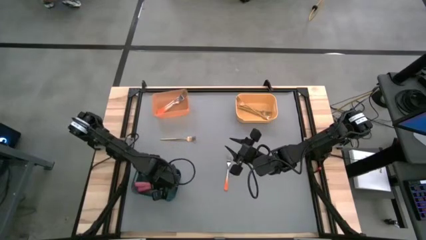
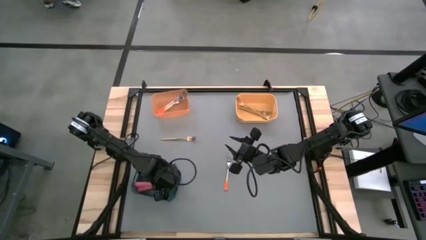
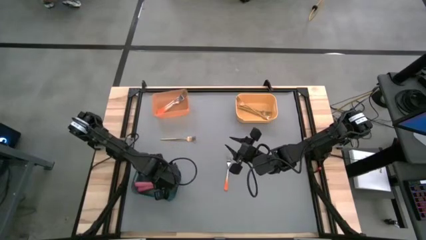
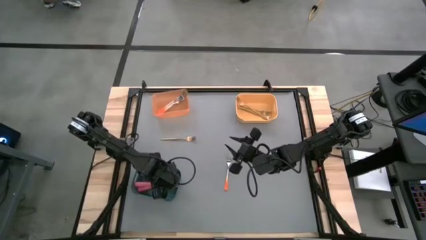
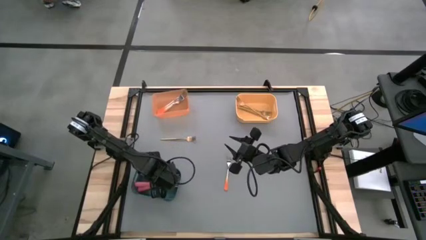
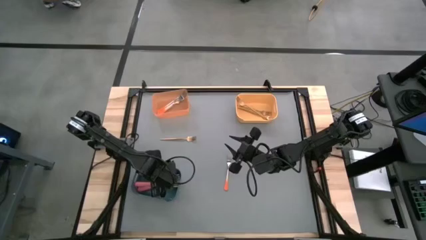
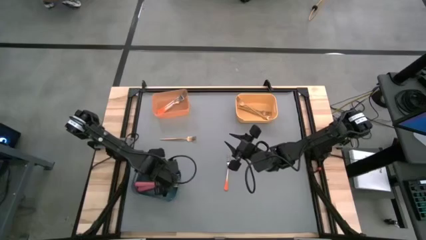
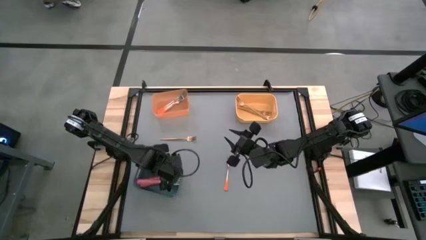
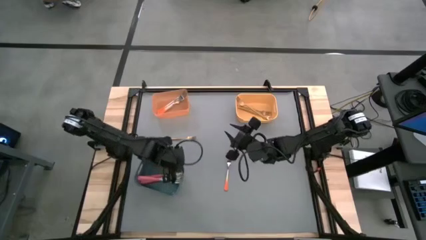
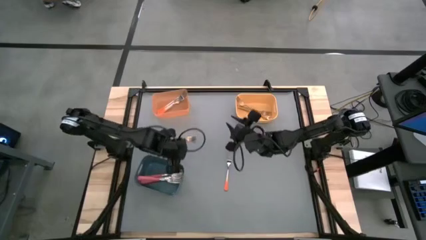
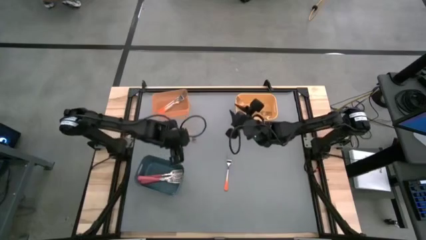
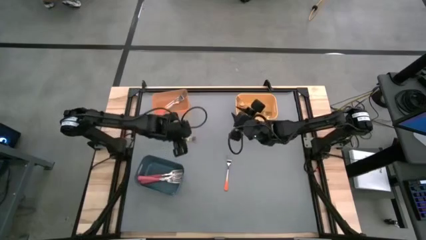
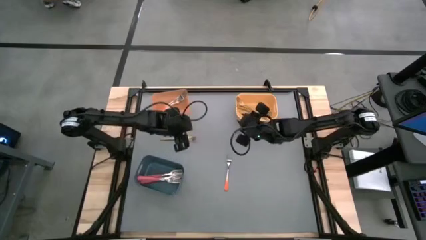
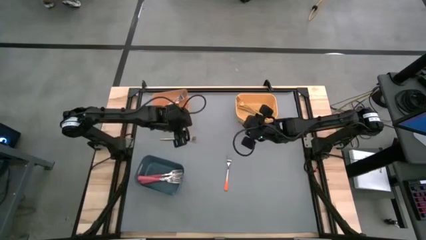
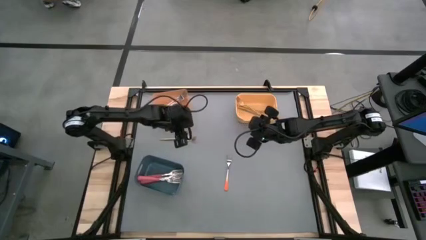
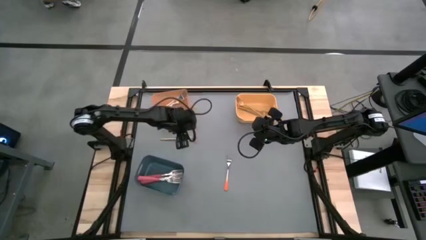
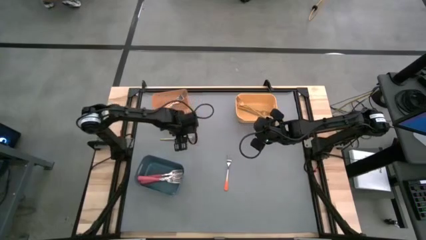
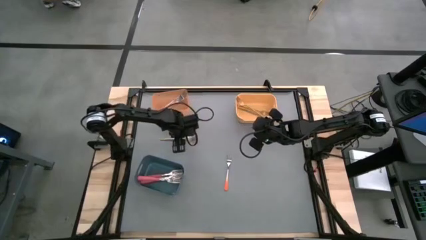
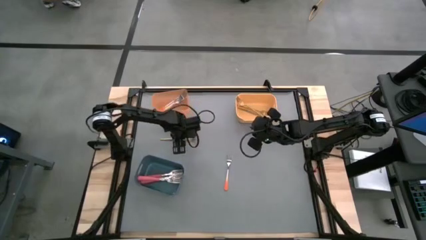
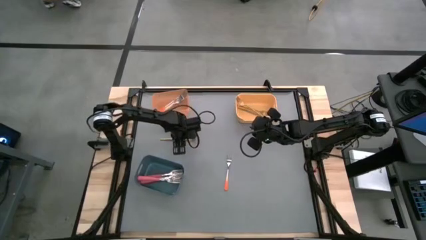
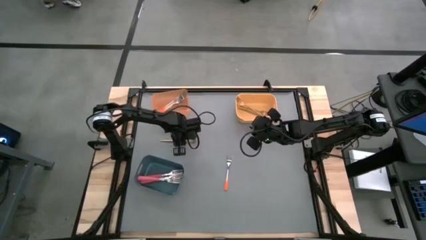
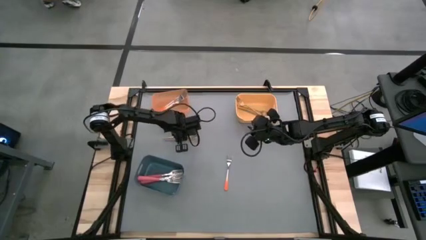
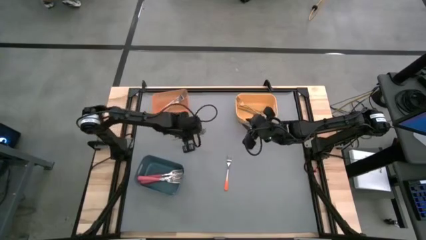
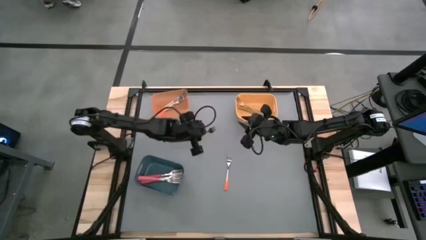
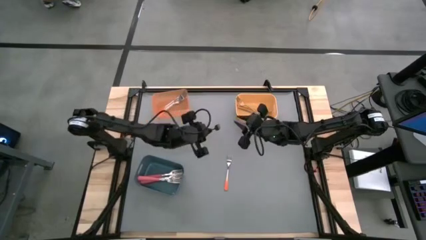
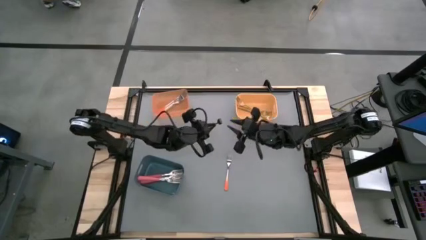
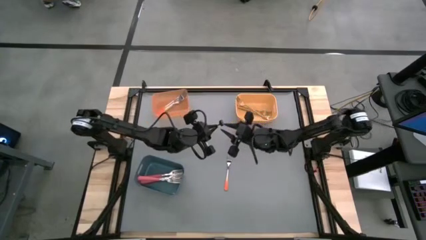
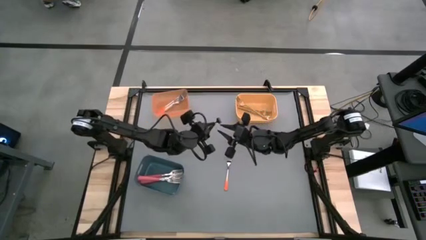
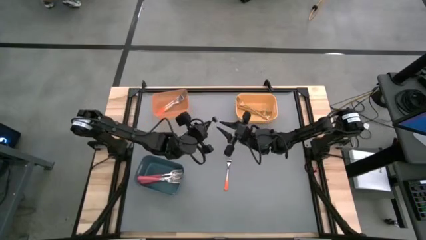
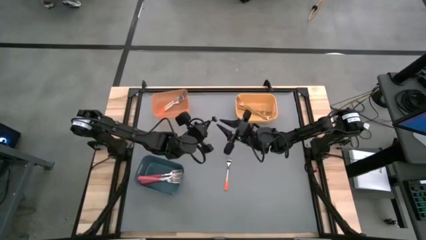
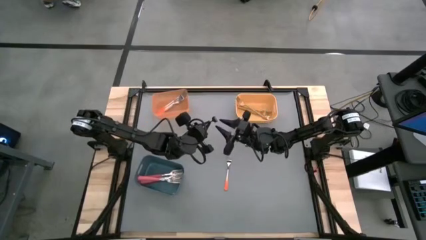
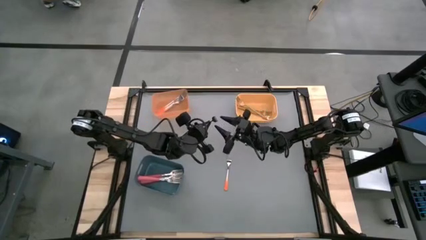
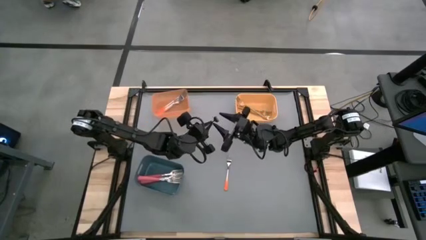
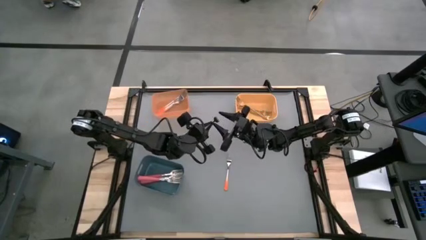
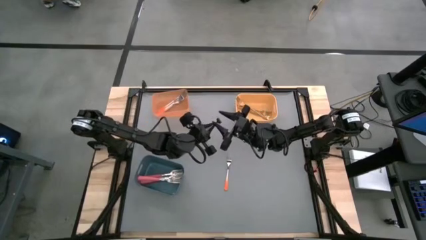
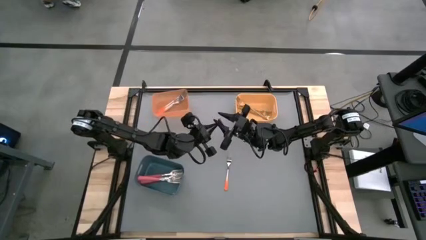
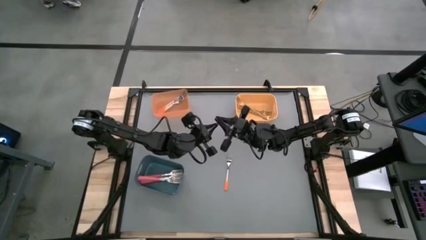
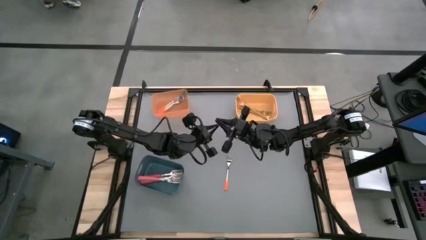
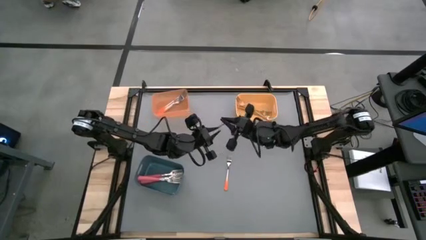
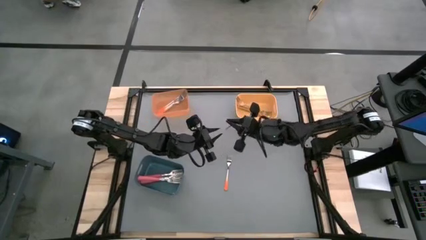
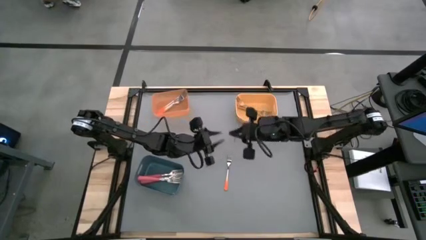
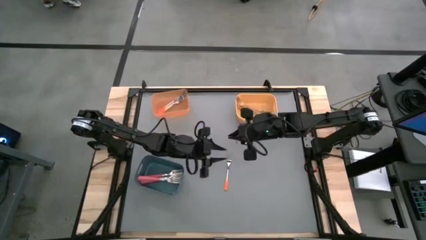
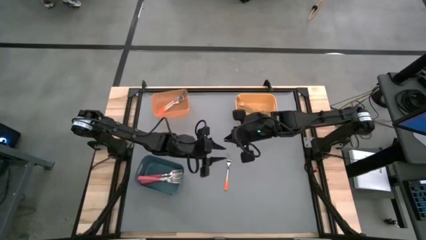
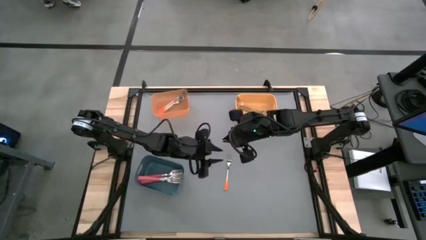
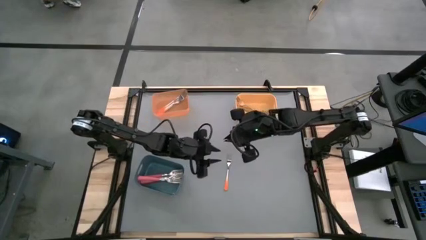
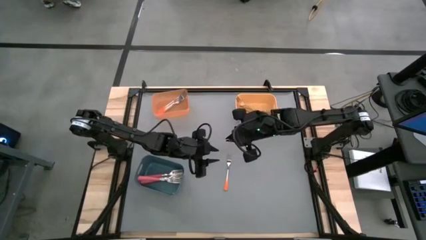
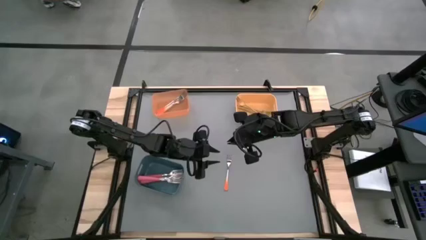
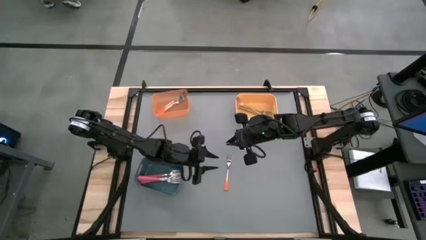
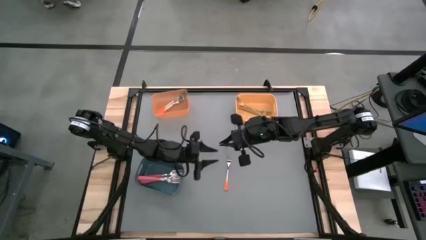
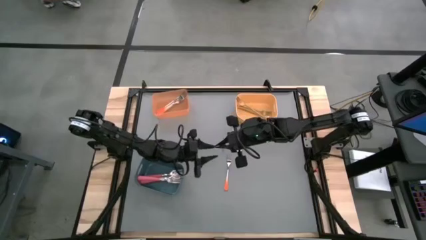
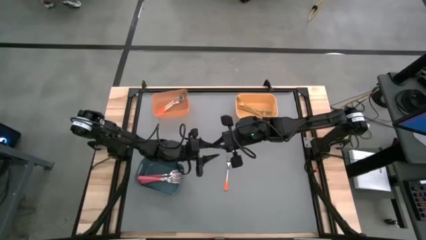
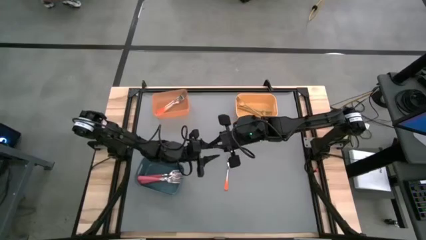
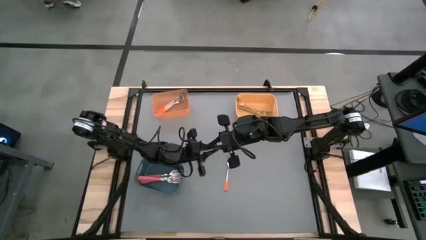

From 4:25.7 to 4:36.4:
Task: Sort silverware by color (type)
Put the gold fork into the yellow bin
